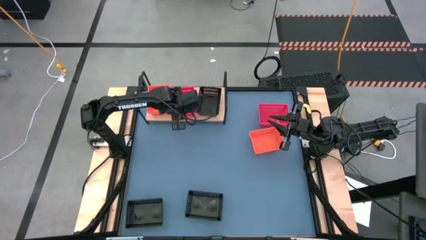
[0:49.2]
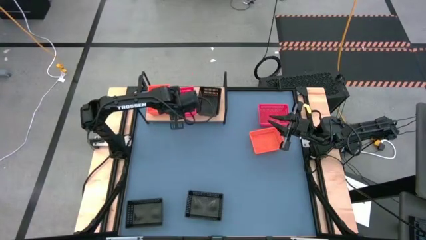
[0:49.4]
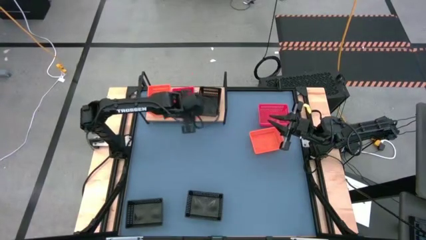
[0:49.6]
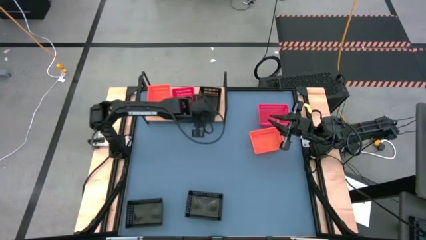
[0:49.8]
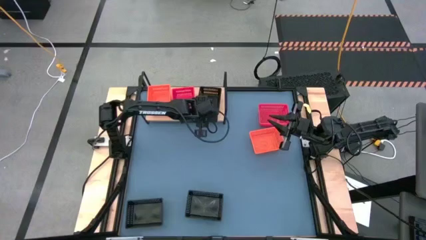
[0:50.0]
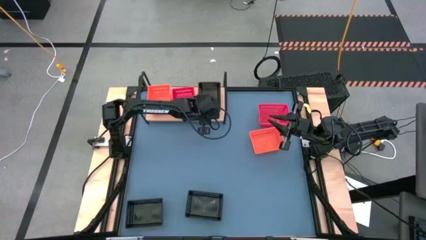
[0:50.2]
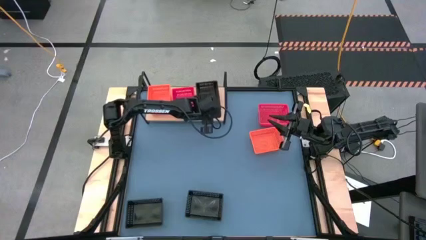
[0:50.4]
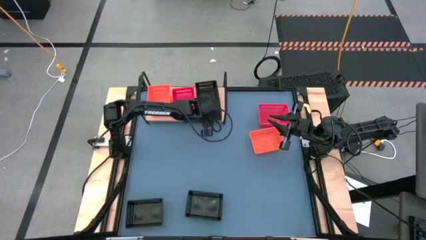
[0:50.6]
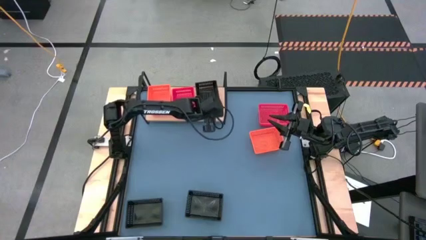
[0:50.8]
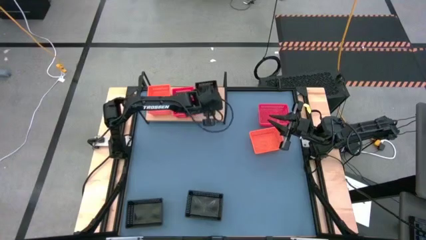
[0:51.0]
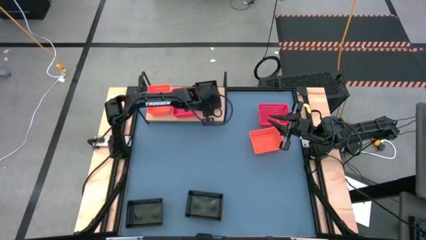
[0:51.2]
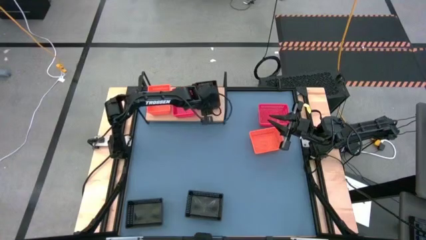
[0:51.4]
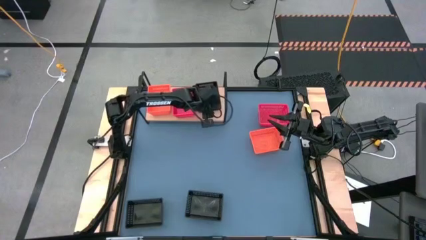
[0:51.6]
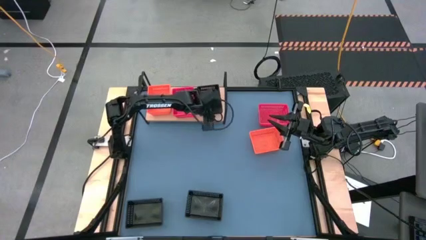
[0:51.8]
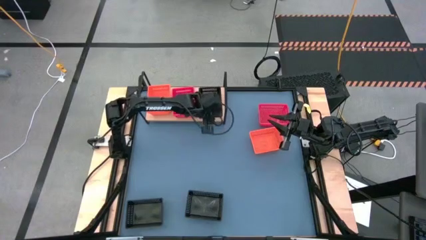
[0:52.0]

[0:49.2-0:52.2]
Task: Stack baskets on shelf by color
Adjust the black bin on the shelf

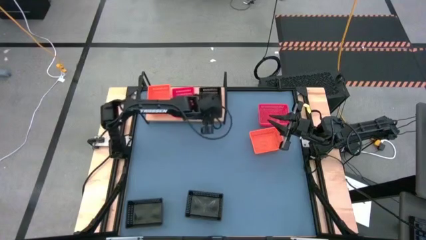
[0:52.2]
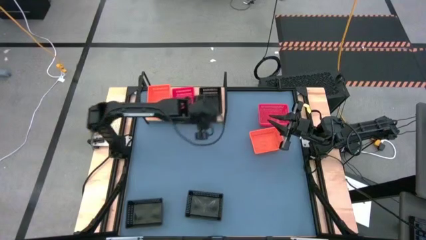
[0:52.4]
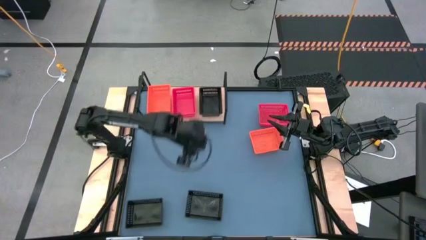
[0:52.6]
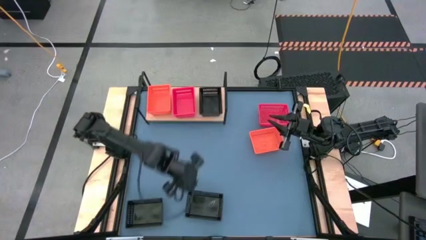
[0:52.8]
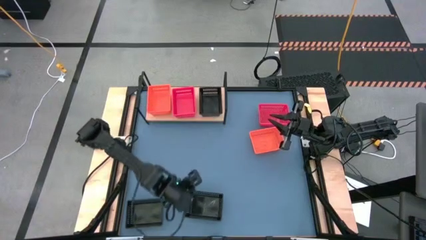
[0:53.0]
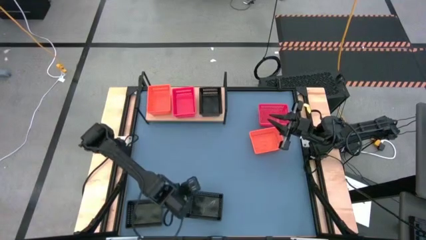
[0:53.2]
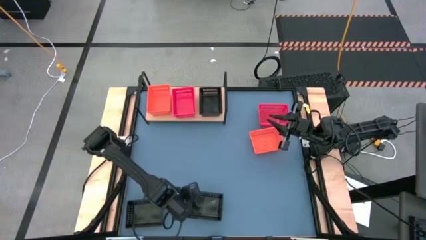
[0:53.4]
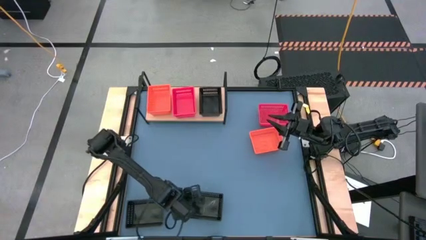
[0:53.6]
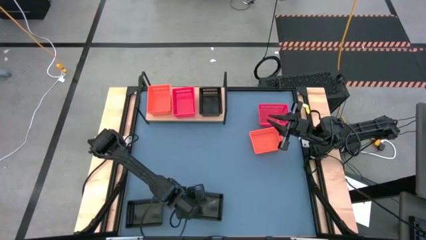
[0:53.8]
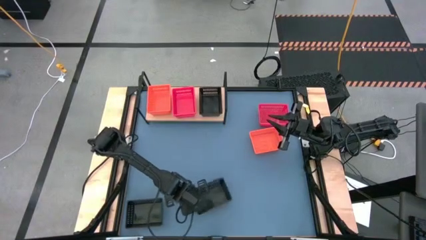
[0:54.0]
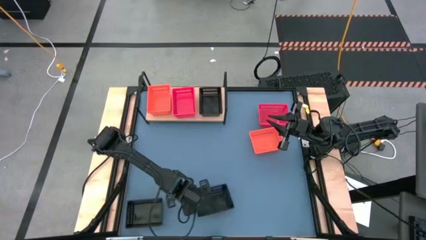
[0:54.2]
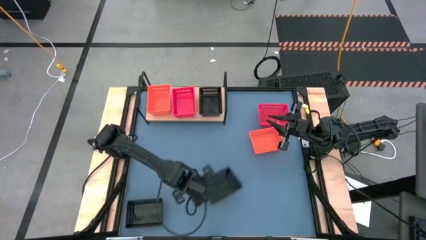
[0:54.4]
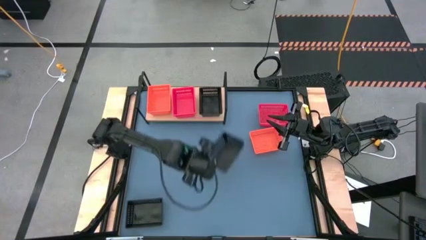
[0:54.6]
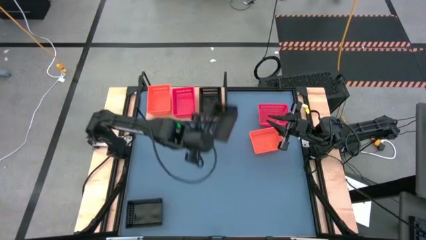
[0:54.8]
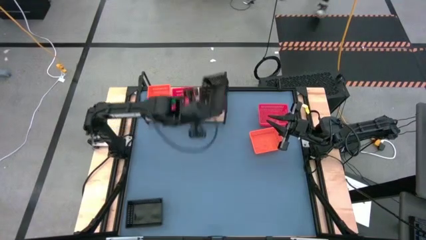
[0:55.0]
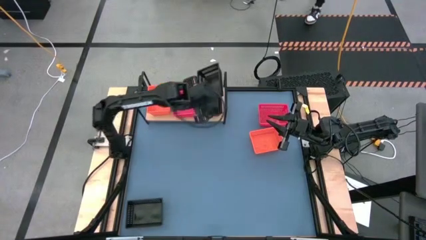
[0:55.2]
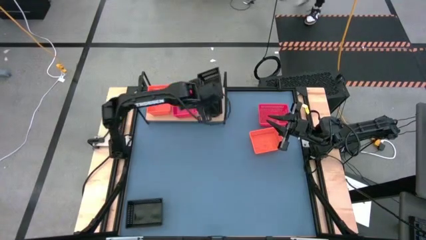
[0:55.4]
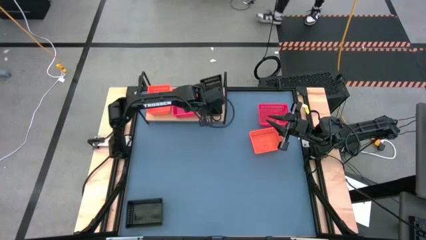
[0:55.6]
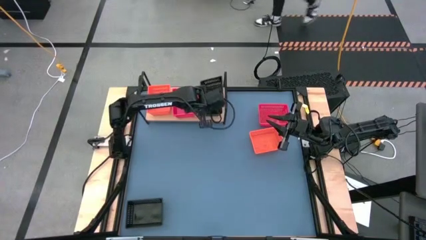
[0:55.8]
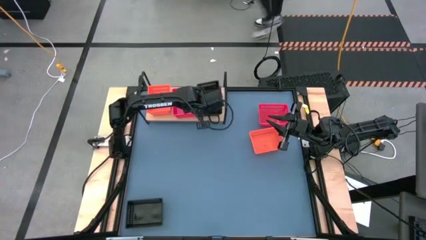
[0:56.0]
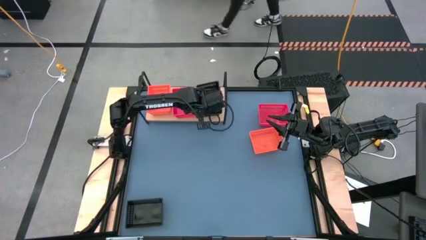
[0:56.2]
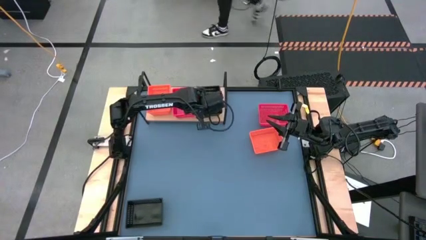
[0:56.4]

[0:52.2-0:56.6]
Stack the right black bin on top of the black bin on the shelf

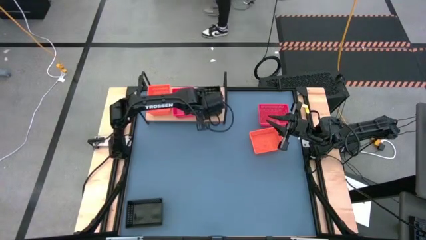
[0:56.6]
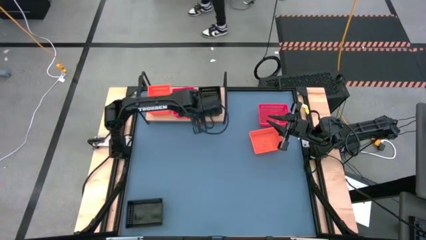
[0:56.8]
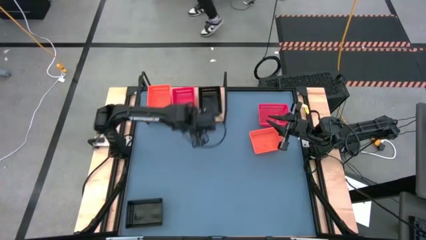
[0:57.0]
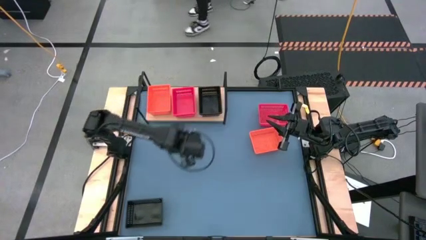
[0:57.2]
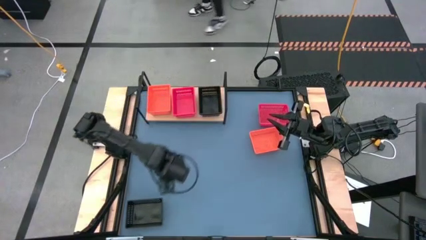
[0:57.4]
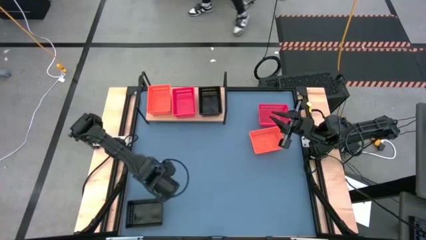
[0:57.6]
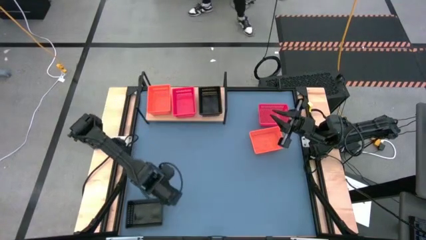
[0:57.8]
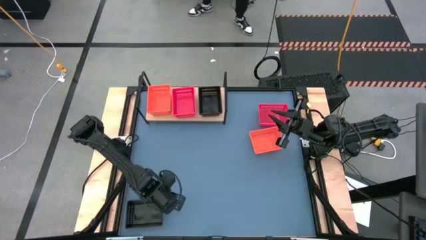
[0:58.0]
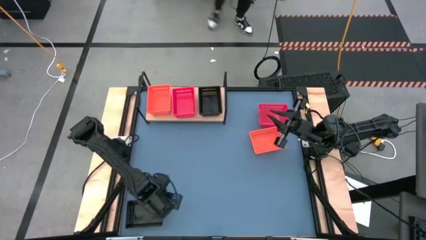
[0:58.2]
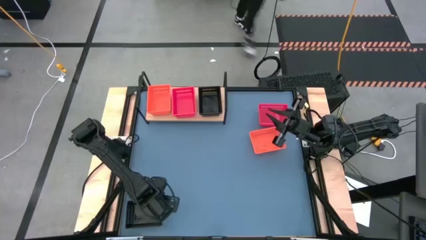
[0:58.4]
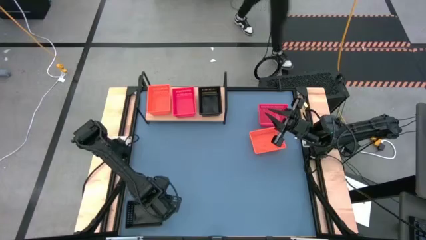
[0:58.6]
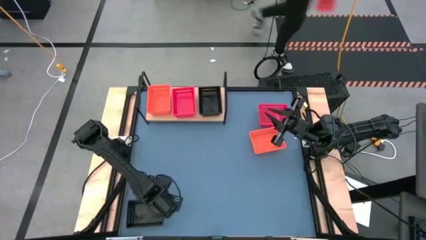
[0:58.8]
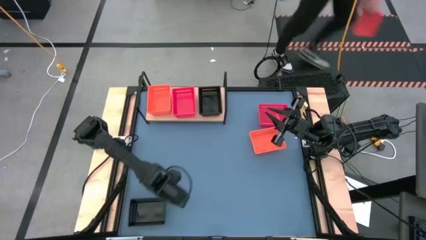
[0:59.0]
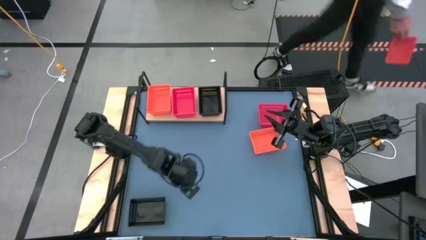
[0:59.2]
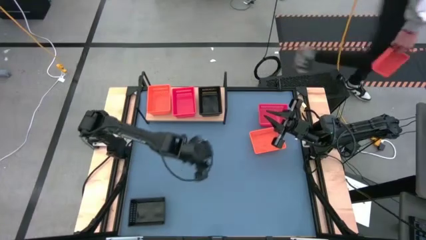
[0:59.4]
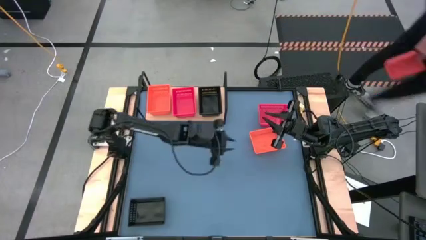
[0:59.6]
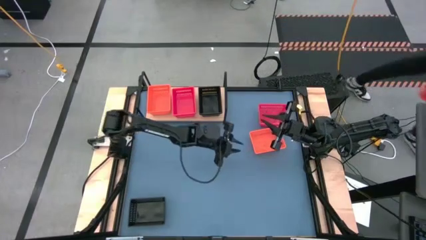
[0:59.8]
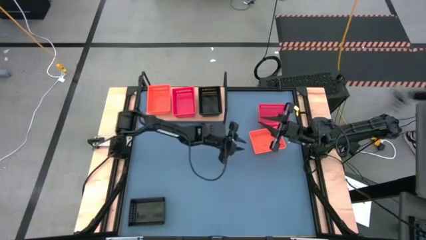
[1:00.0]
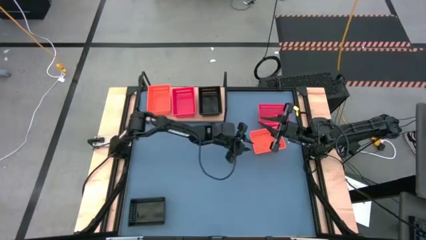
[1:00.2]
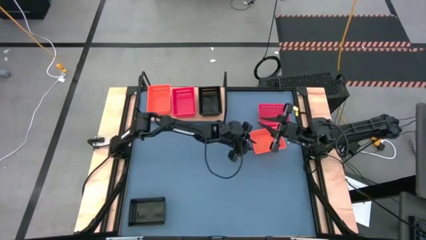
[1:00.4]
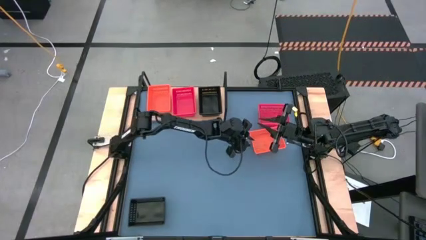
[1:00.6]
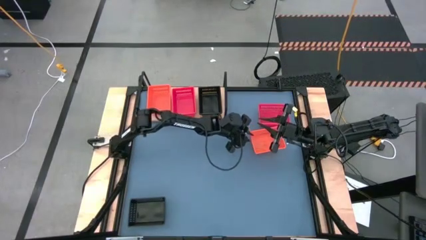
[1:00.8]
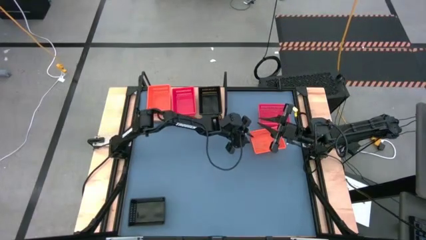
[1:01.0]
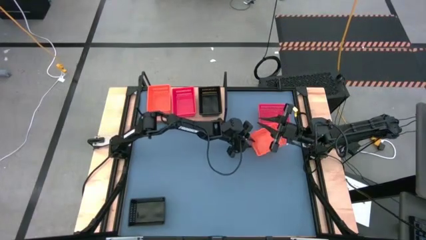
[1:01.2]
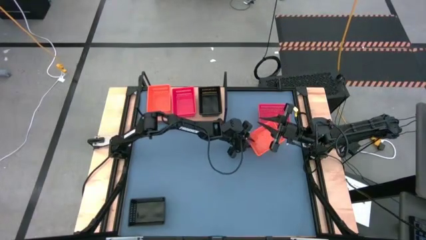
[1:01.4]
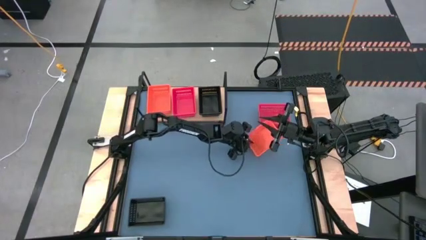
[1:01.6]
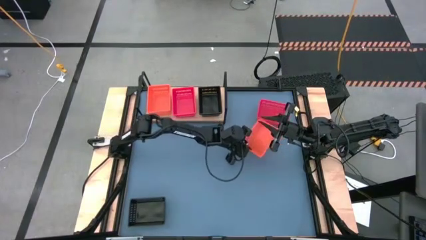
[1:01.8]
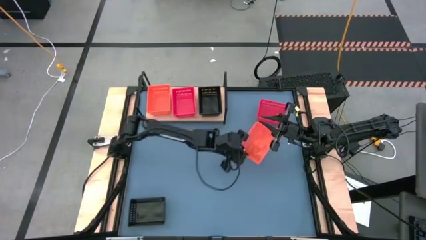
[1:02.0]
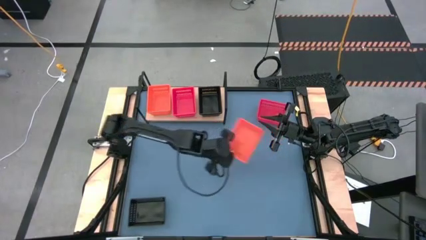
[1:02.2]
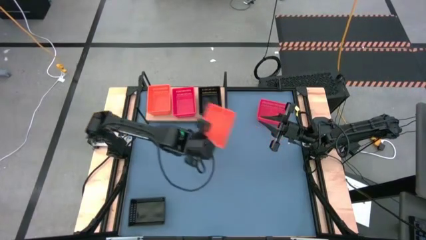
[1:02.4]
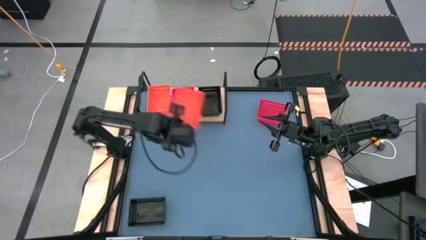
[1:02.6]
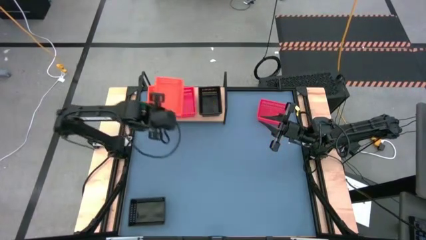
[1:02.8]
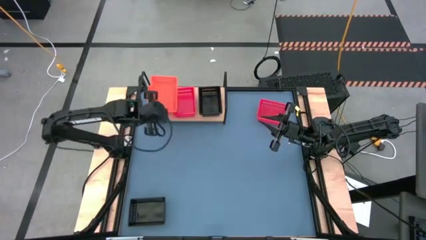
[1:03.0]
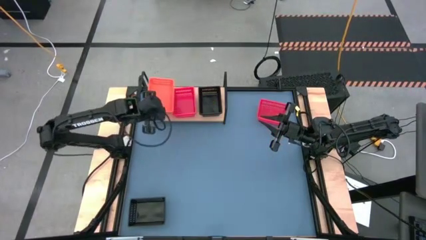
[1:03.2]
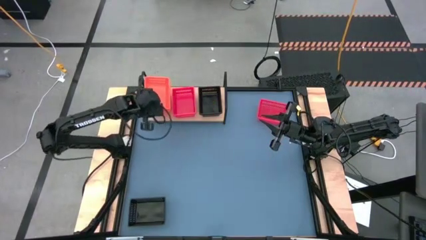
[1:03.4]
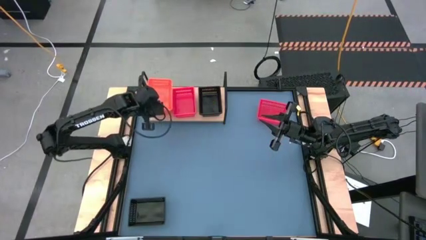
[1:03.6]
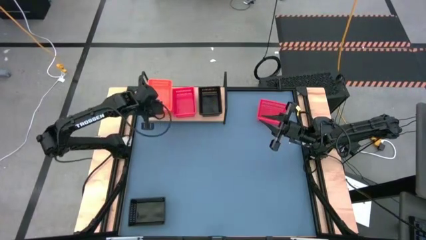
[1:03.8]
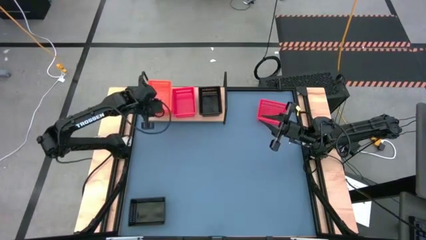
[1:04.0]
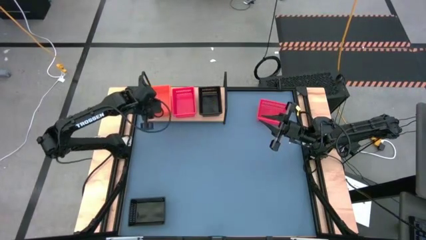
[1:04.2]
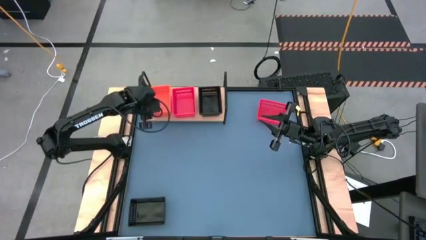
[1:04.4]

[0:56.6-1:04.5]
Stack the orange bin on top of the stacked orange bins on the shelf
